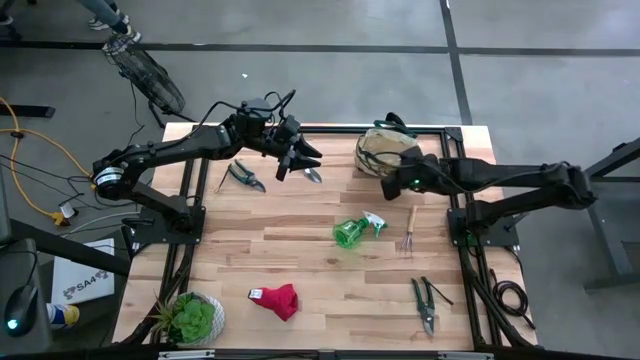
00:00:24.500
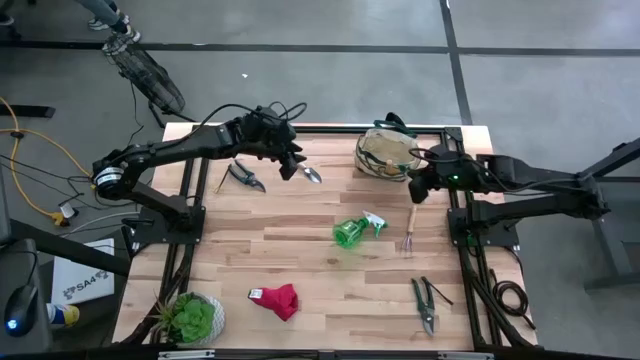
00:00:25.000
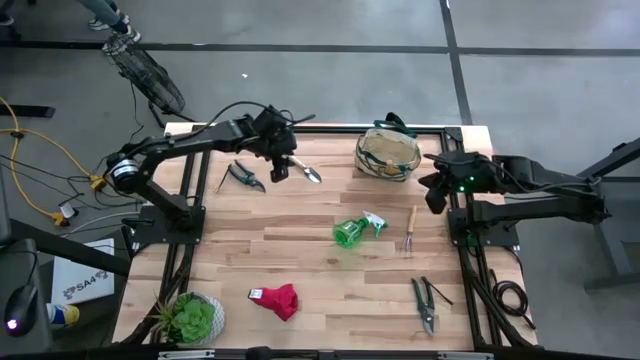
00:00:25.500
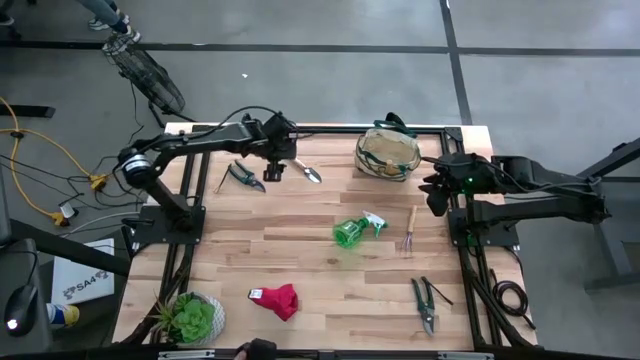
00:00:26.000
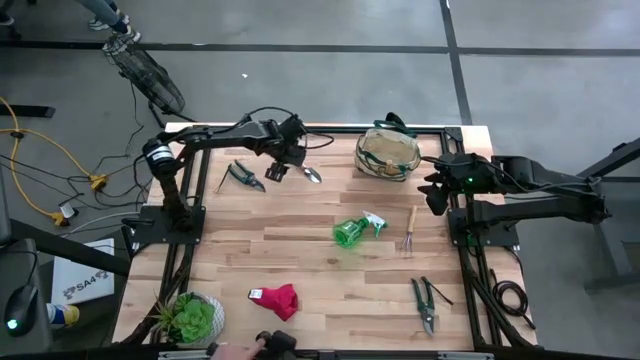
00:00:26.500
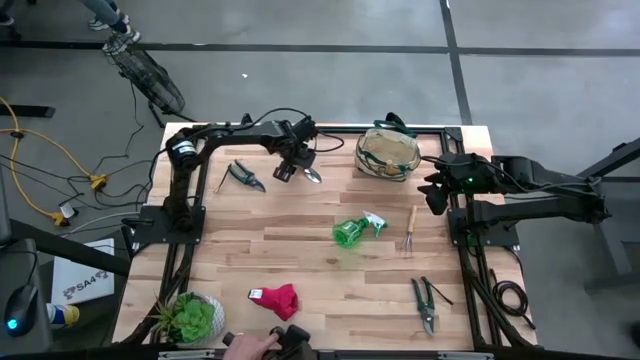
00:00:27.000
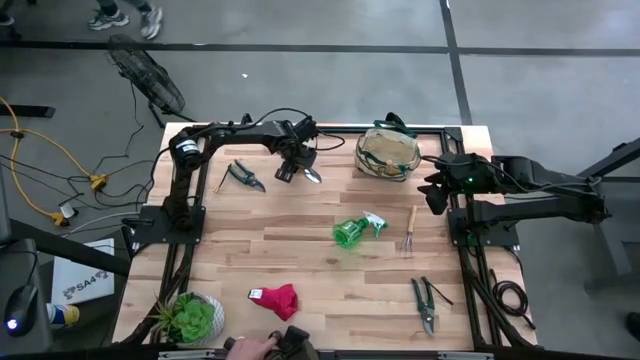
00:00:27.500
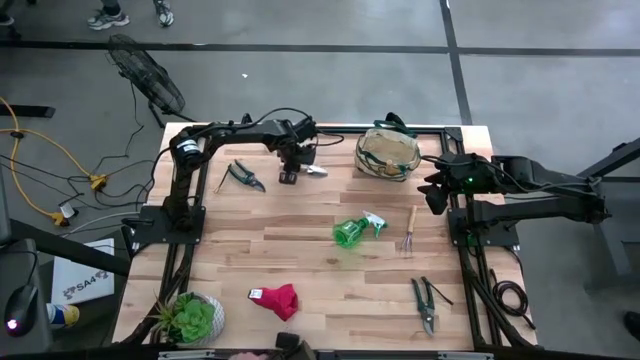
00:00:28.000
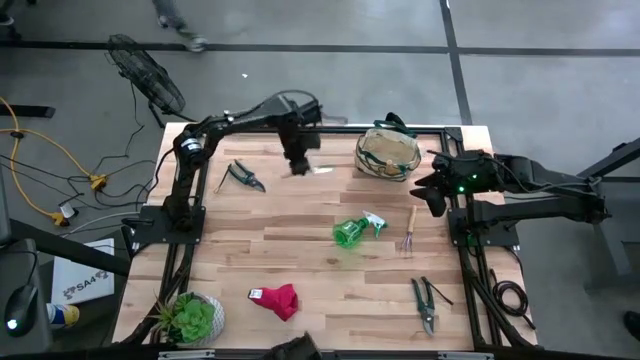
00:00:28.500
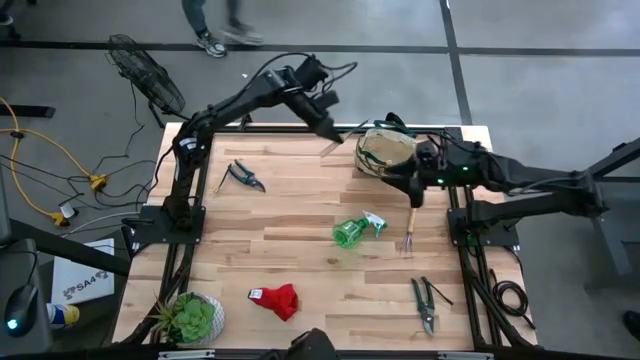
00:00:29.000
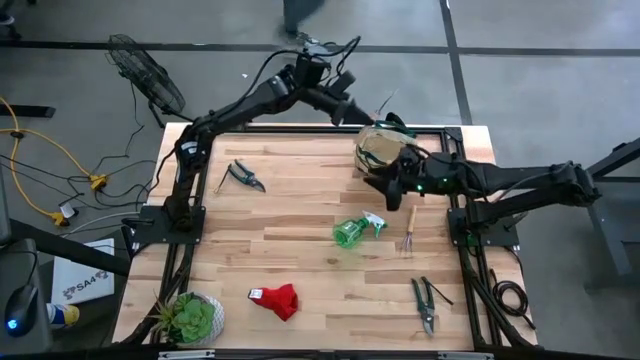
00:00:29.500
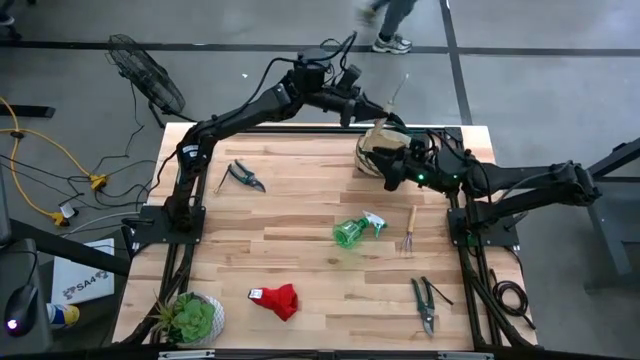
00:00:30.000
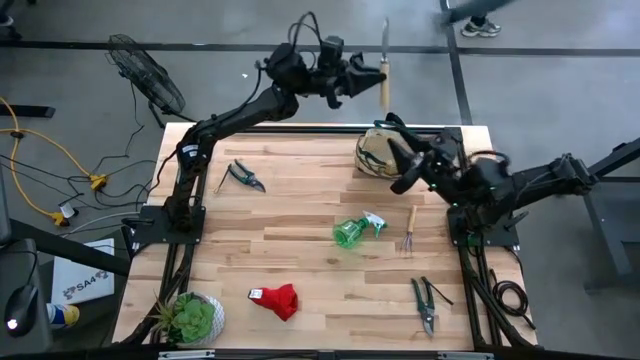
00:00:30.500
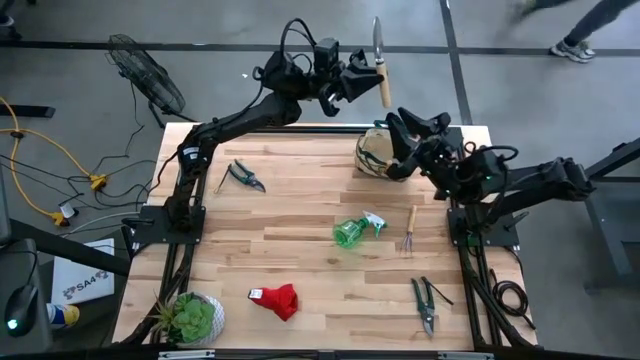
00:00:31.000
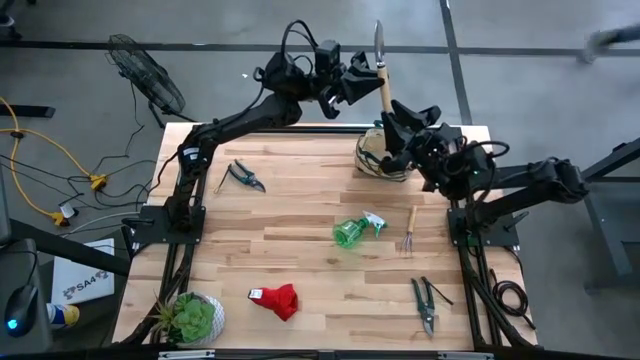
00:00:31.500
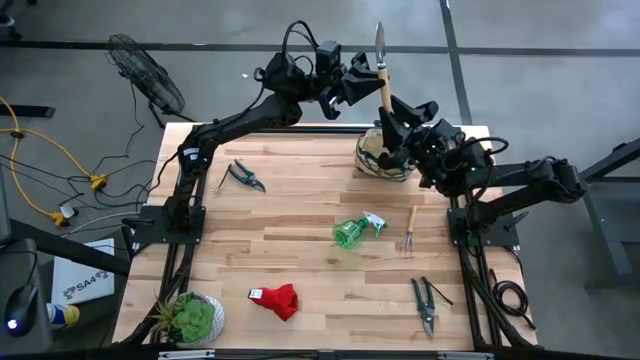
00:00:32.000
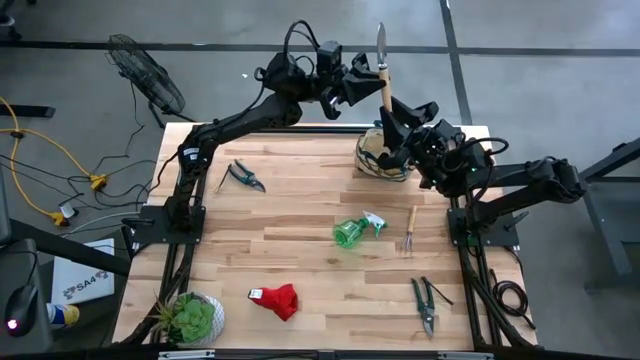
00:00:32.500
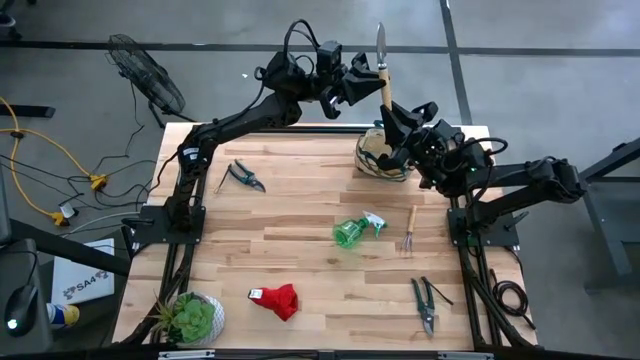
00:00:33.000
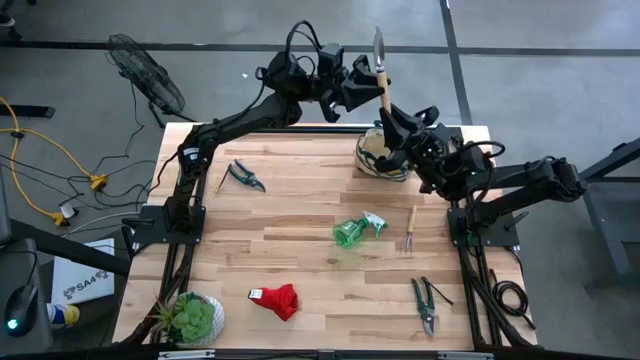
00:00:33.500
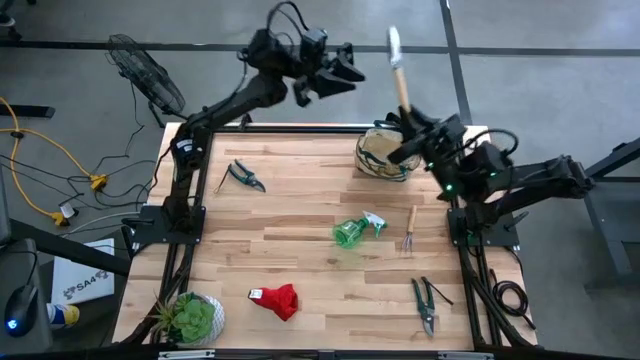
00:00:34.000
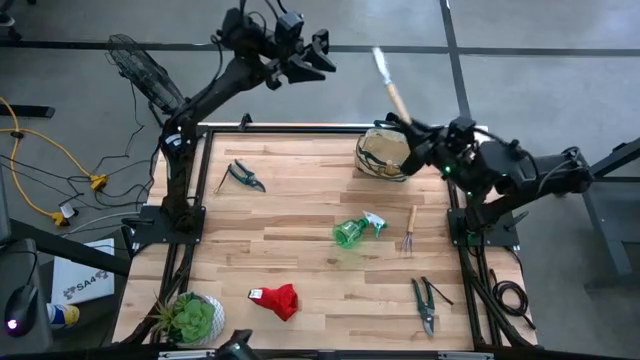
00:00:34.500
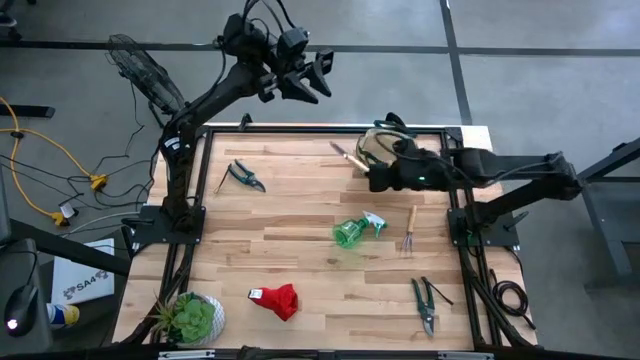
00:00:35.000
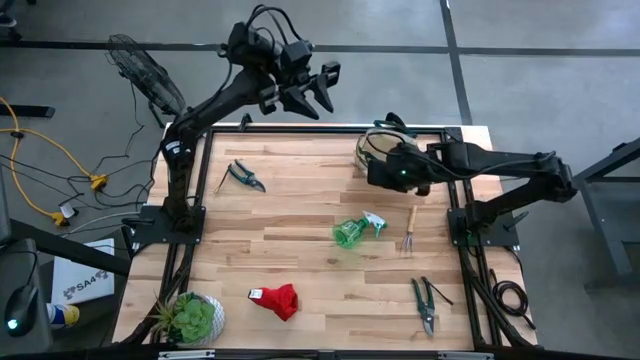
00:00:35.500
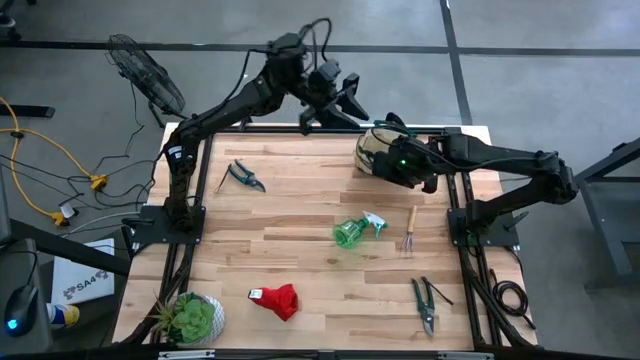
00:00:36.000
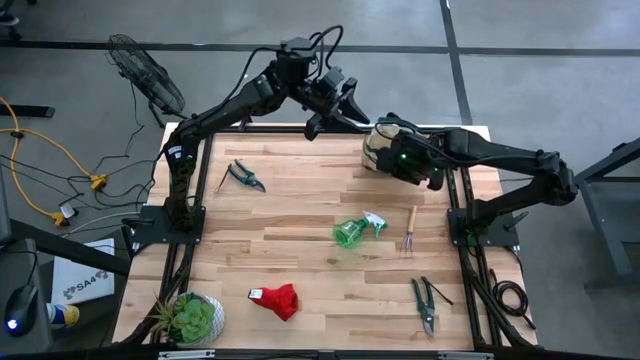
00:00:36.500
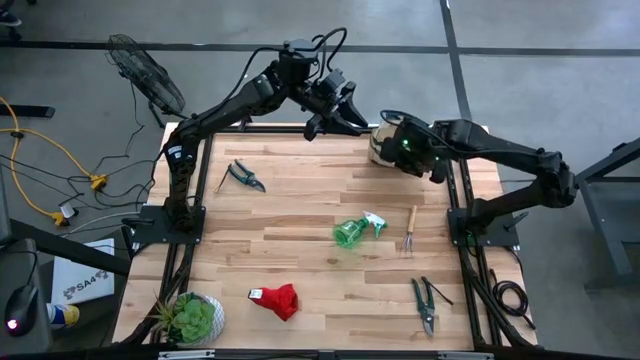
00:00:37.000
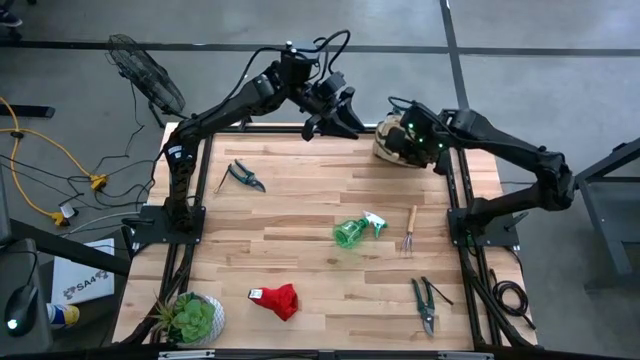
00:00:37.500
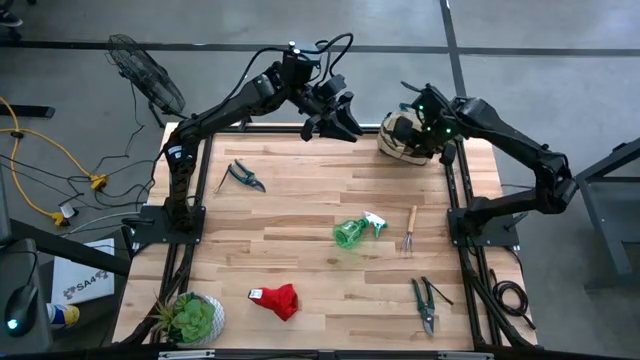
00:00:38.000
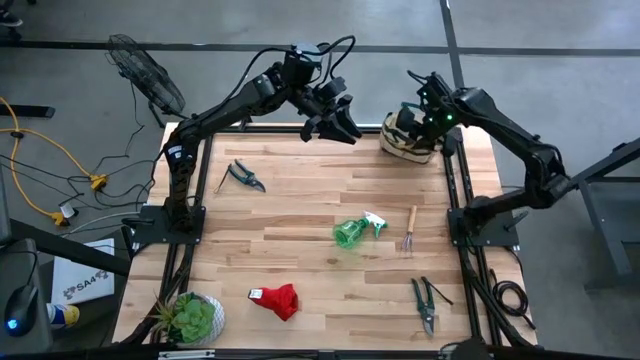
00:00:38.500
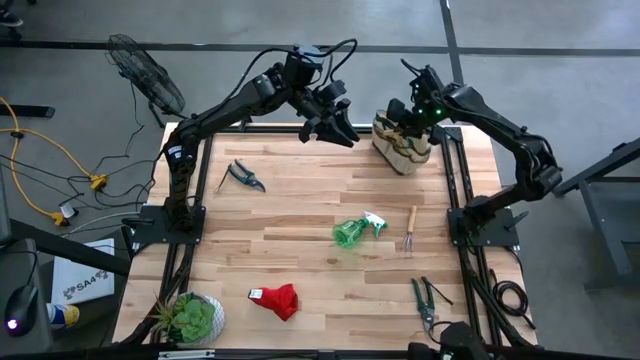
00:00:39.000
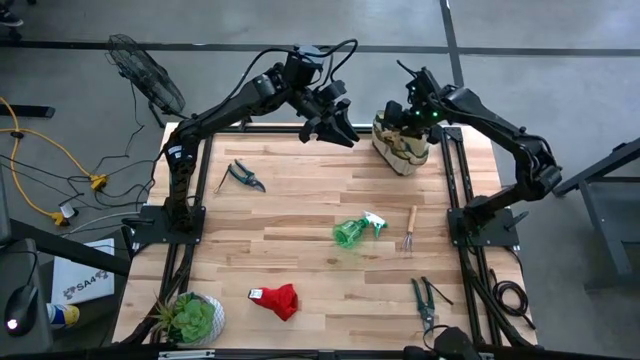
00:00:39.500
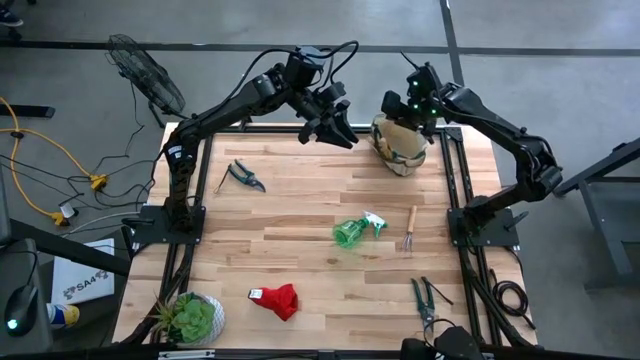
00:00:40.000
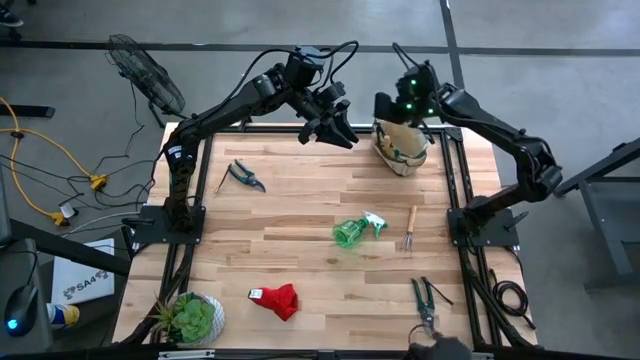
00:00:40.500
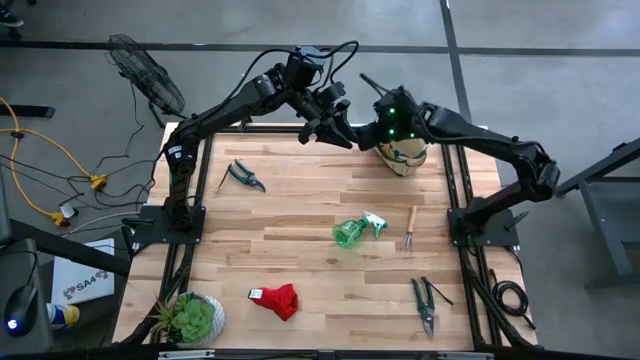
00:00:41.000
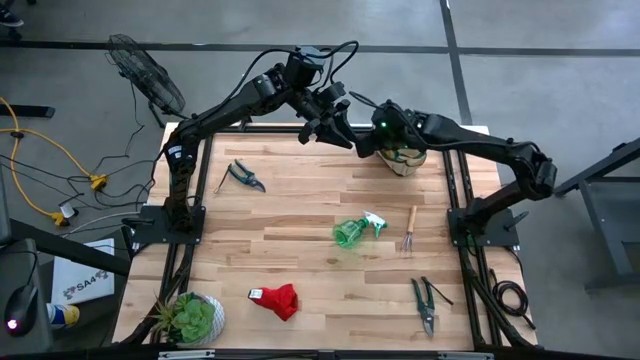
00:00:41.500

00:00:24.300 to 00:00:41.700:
Task: Pick & Place Garden tools in Gardening bag
Put the gardening trowel into the gardening bag

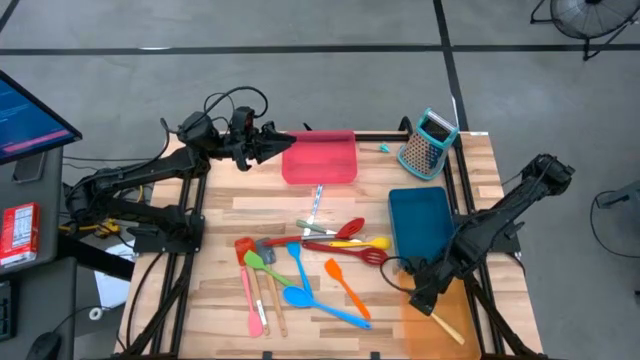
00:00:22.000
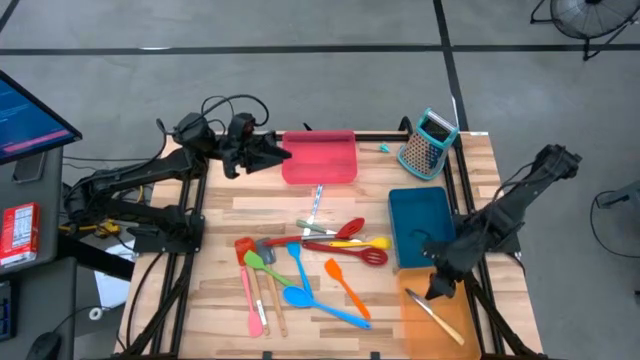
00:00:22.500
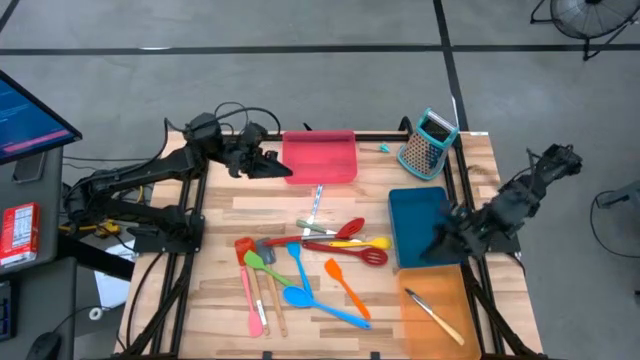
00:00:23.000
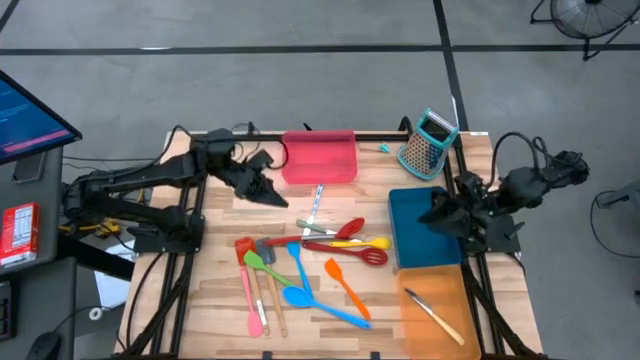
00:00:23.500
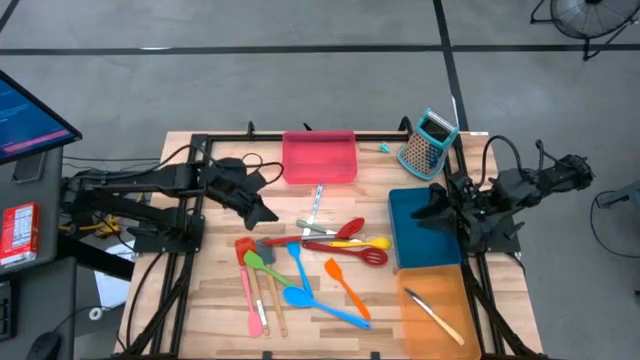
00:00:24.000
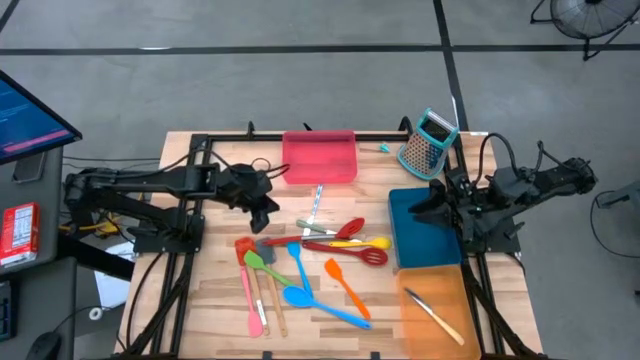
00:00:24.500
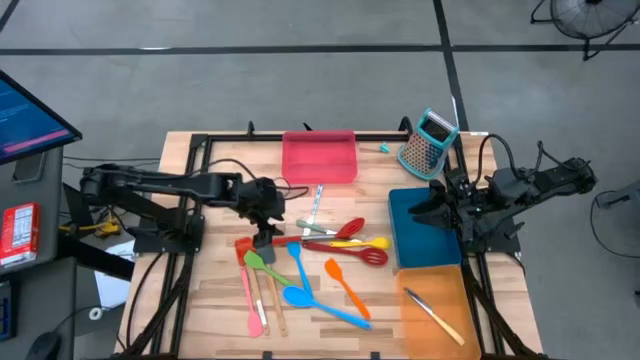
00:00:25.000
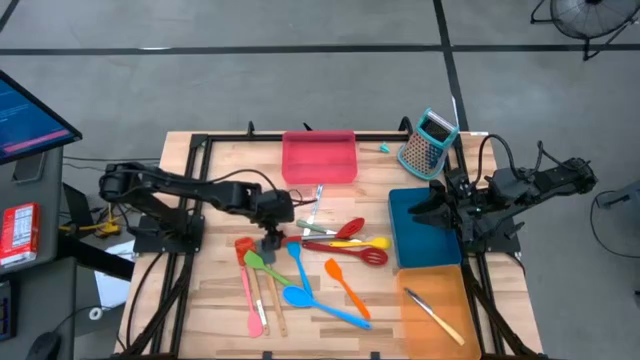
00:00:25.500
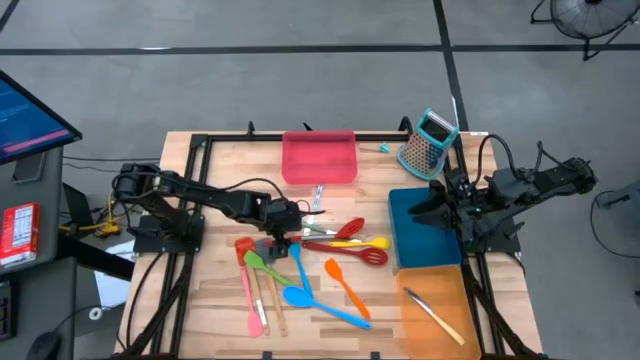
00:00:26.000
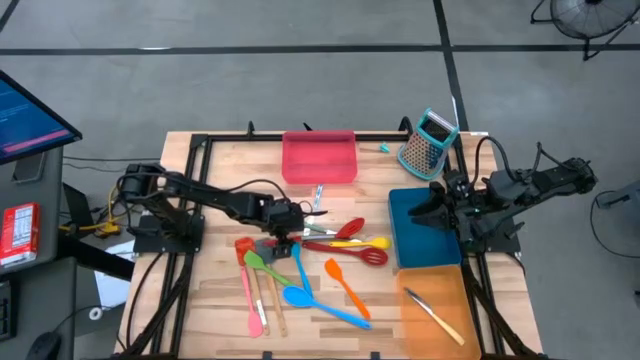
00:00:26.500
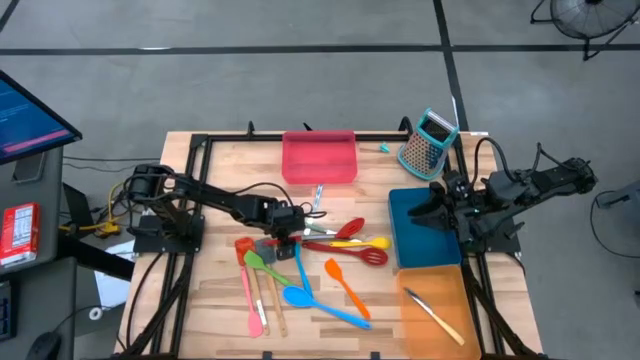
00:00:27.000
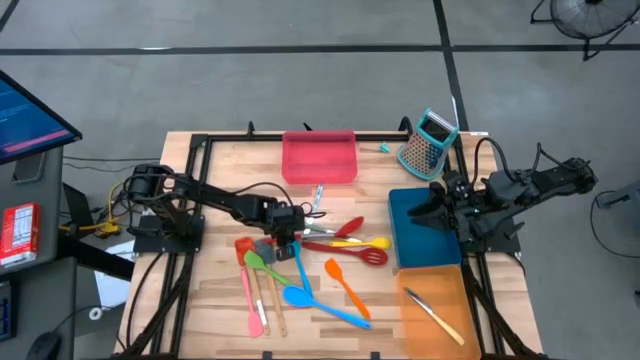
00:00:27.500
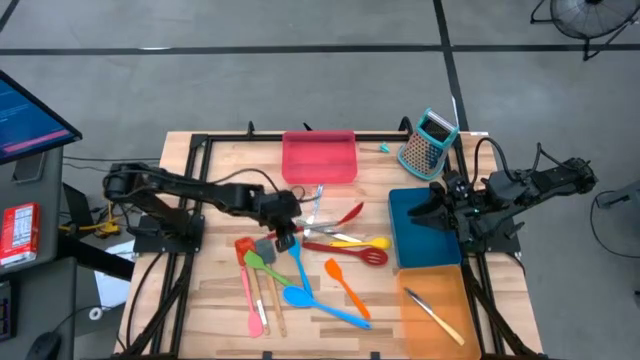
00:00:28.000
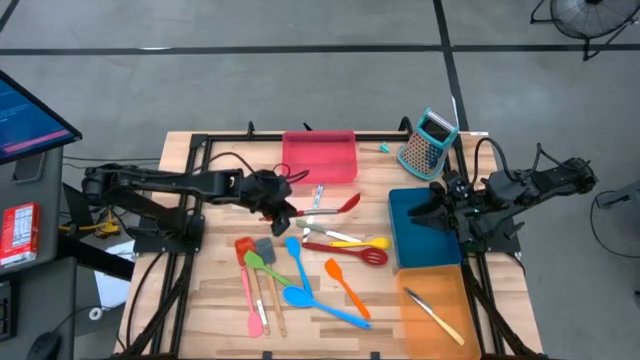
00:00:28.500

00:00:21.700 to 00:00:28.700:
Task: Pick & Place Kitchen Items
Put the red serving spoon into the red bin
